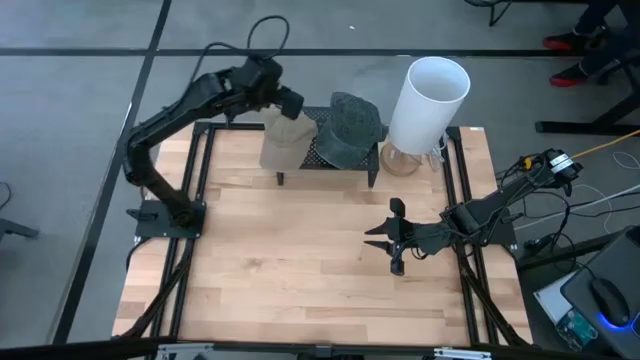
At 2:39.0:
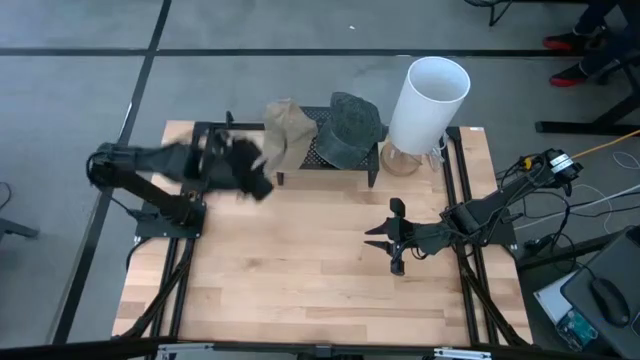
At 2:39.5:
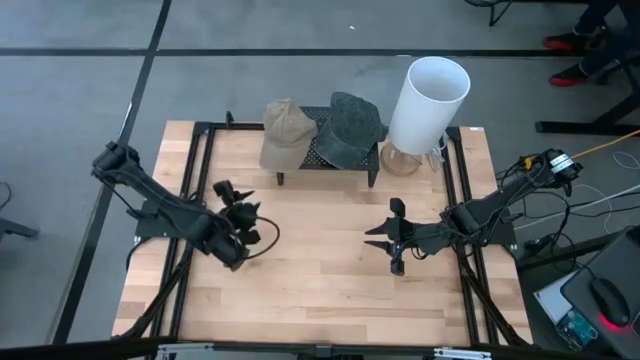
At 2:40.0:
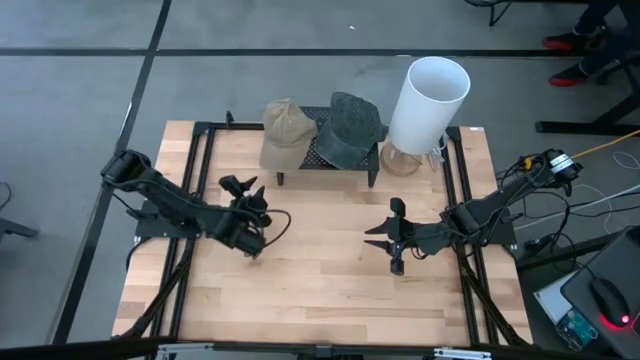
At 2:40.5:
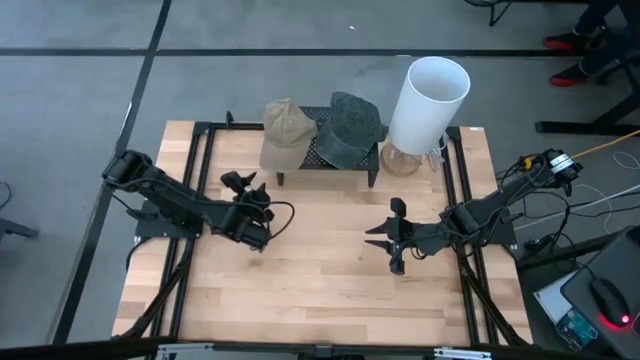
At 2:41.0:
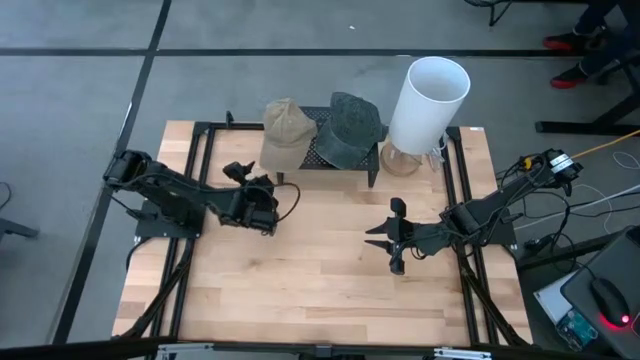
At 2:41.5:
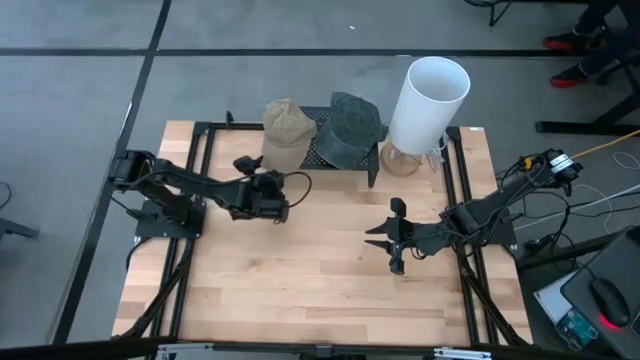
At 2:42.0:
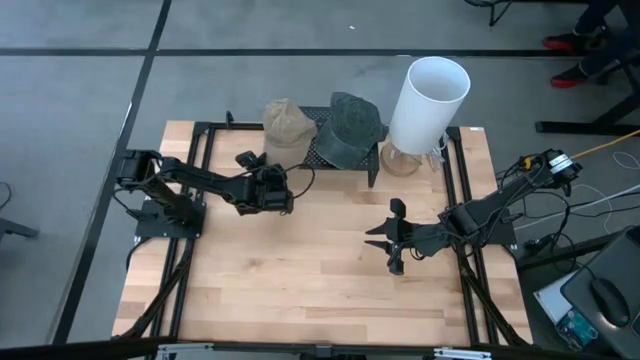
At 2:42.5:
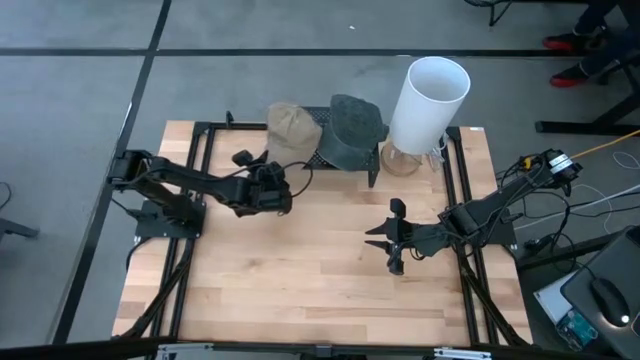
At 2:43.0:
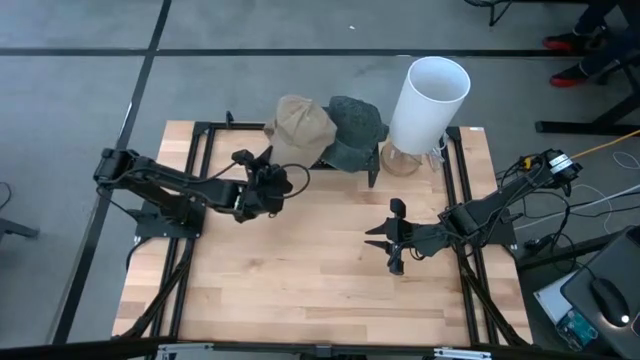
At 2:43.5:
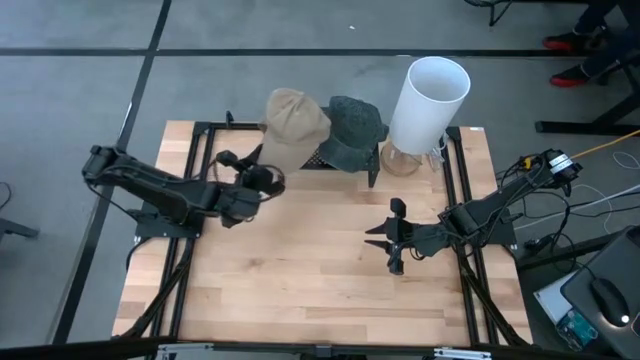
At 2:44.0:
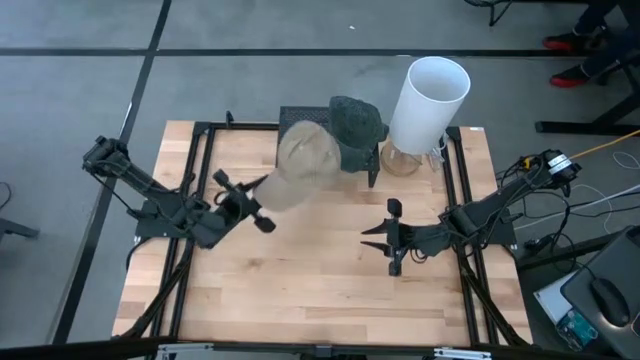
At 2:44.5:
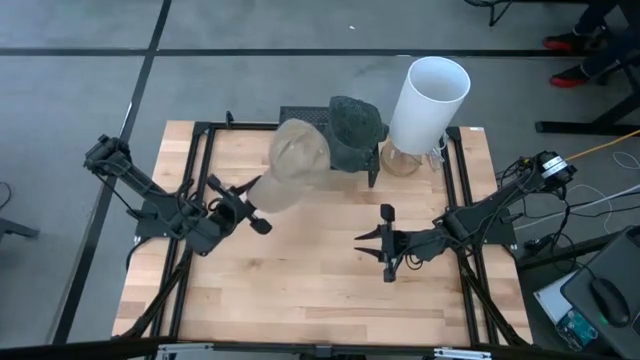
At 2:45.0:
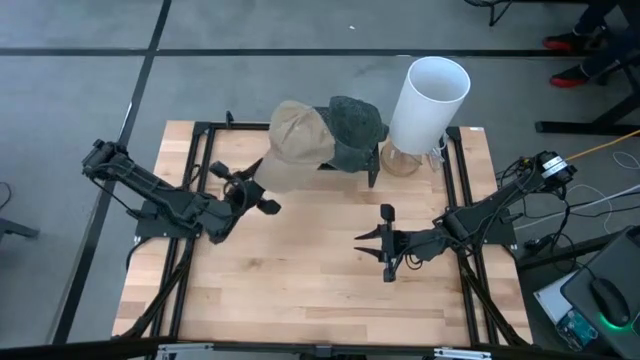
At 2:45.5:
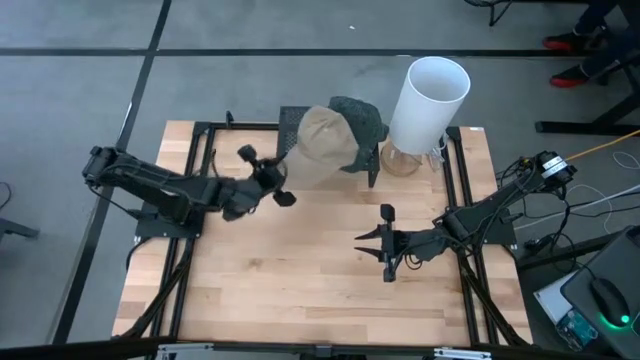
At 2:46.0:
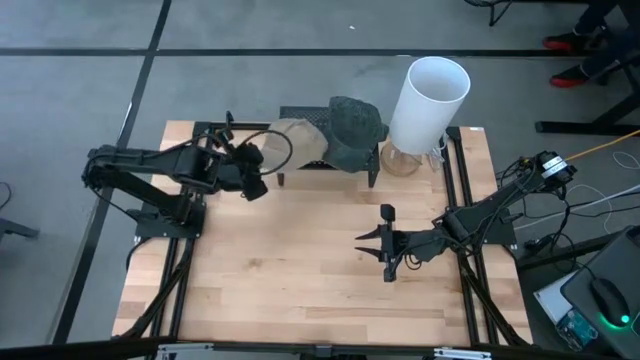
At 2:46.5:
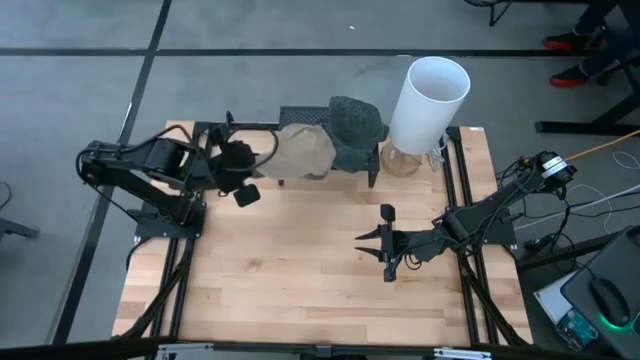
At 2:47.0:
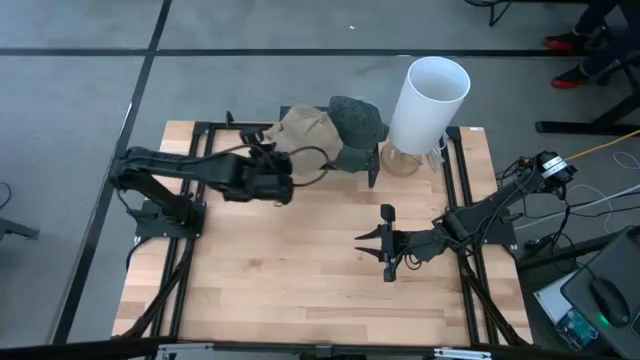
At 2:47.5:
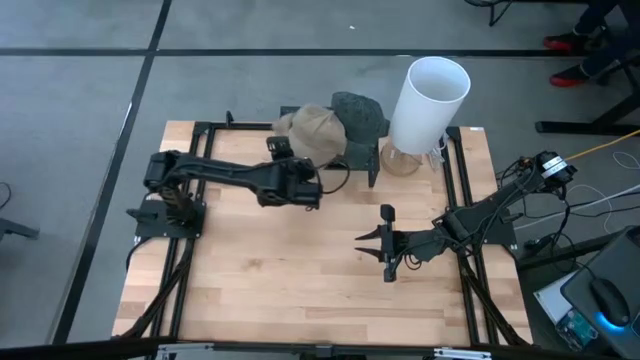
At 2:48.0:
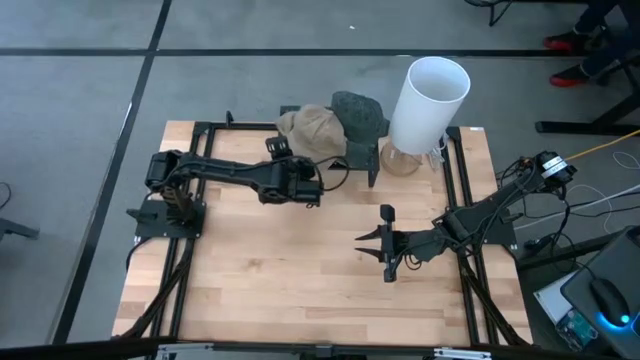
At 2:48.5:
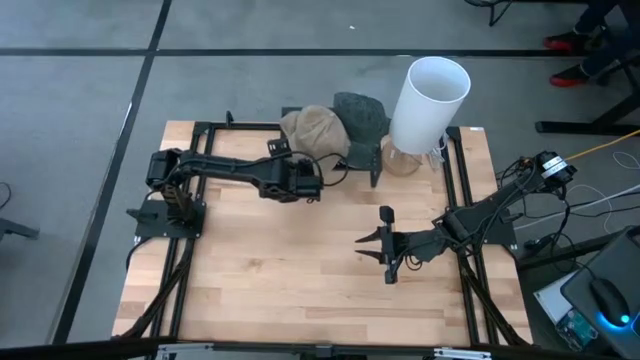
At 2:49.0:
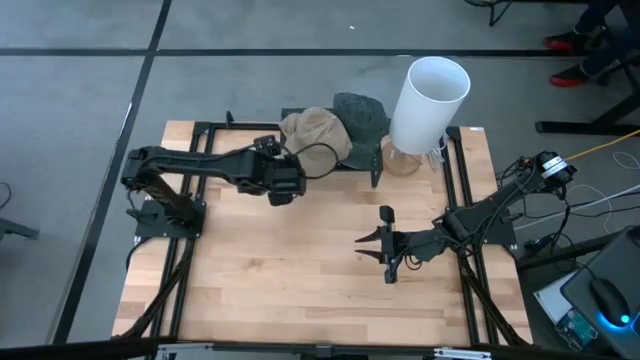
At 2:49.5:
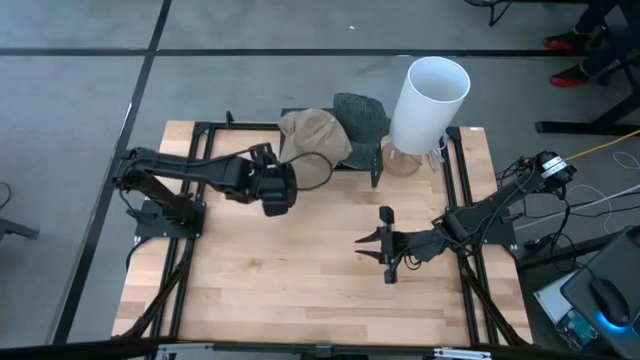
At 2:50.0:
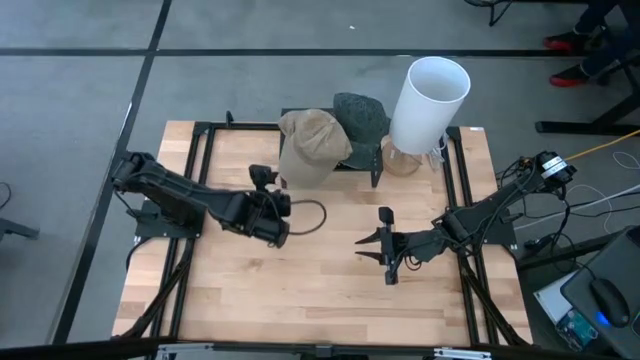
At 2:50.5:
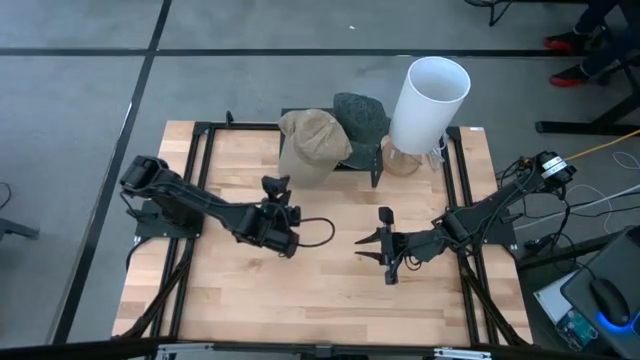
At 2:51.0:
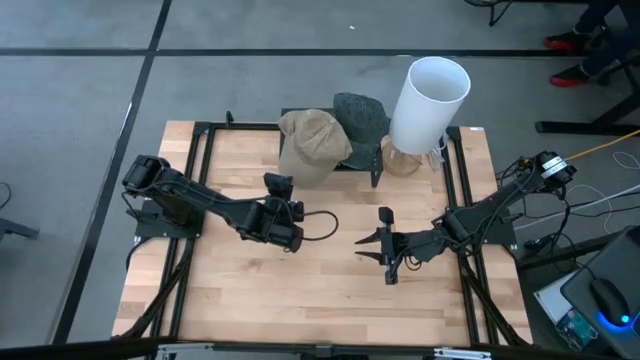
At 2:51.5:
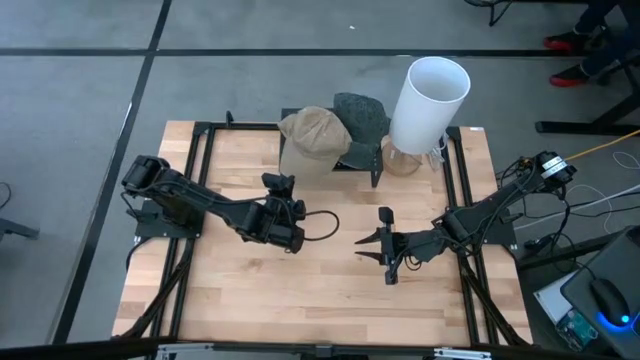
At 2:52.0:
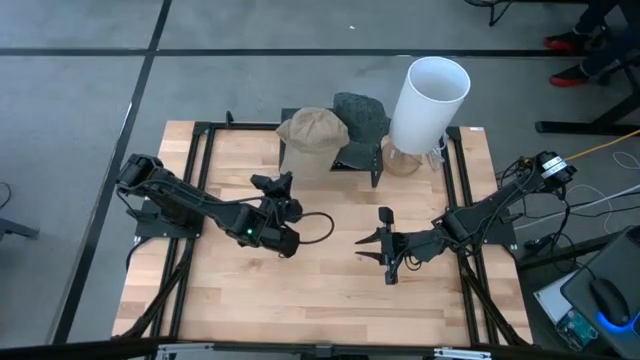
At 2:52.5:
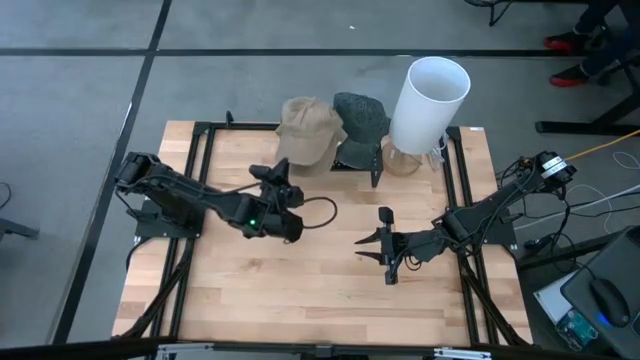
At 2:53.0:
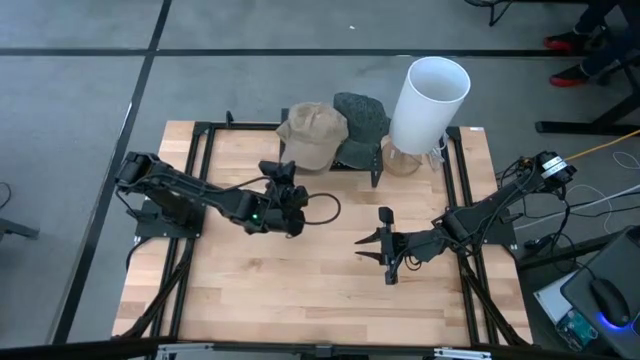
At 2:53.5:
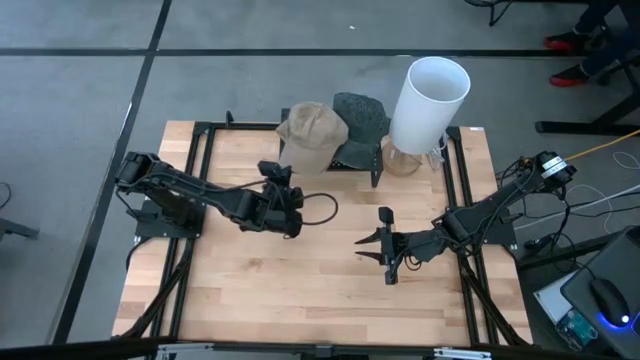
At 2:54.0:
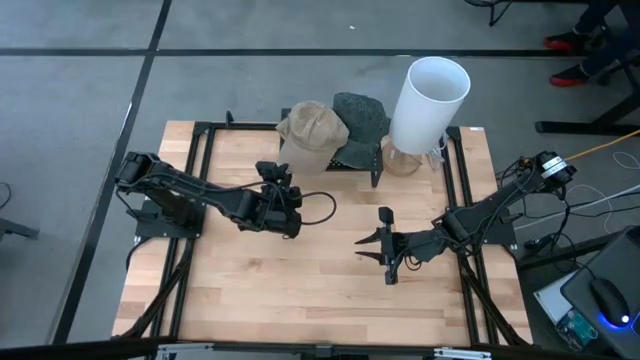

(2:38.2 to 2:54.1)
Task: Pick & Place hat
Adjust the brown caps on the shelf

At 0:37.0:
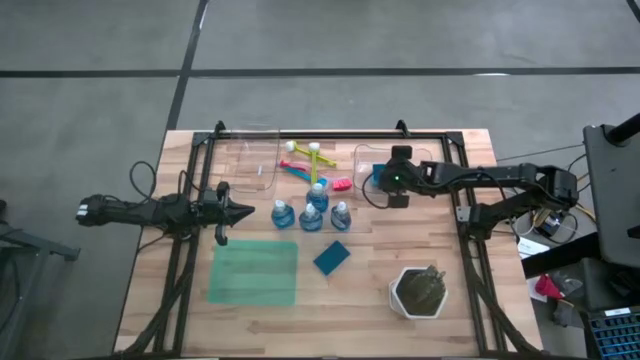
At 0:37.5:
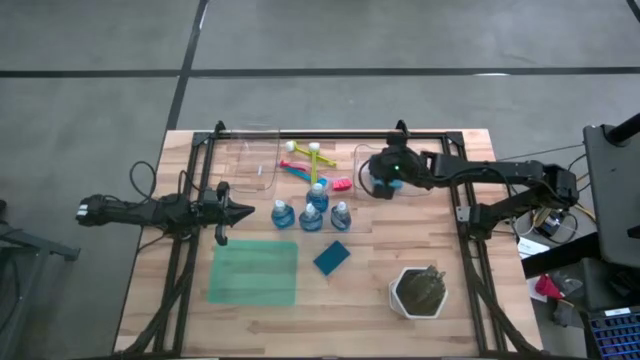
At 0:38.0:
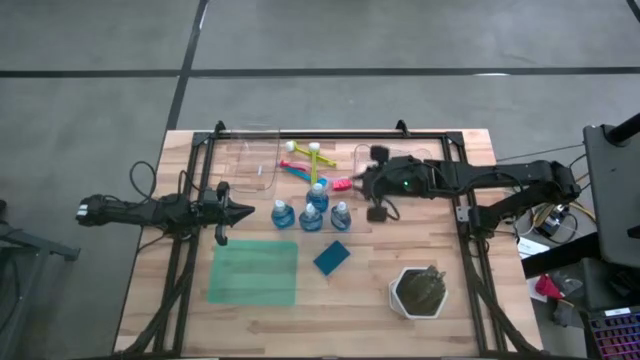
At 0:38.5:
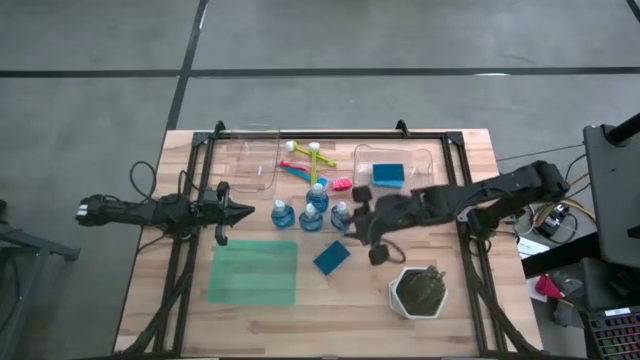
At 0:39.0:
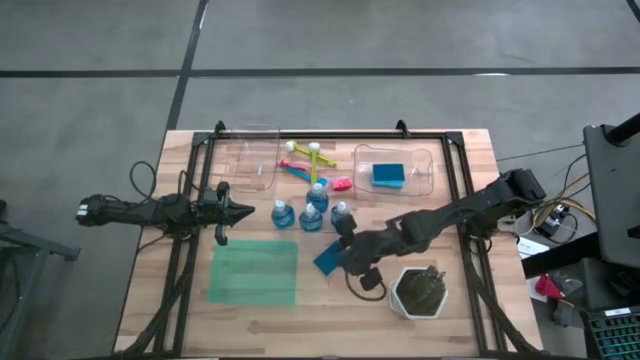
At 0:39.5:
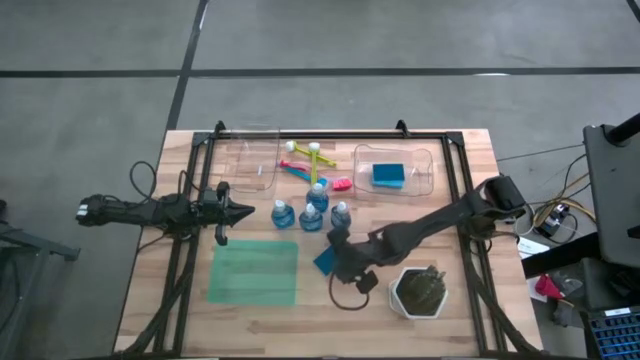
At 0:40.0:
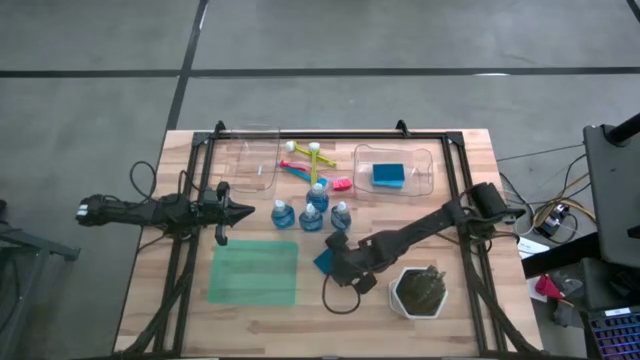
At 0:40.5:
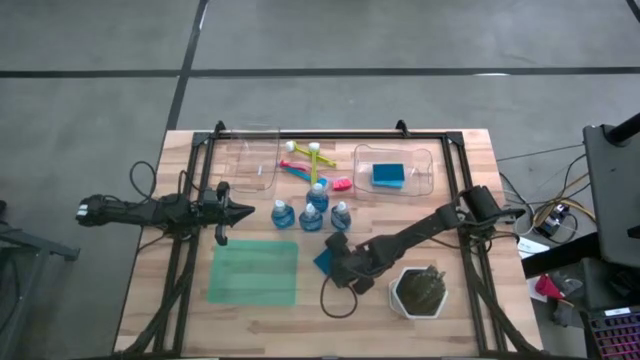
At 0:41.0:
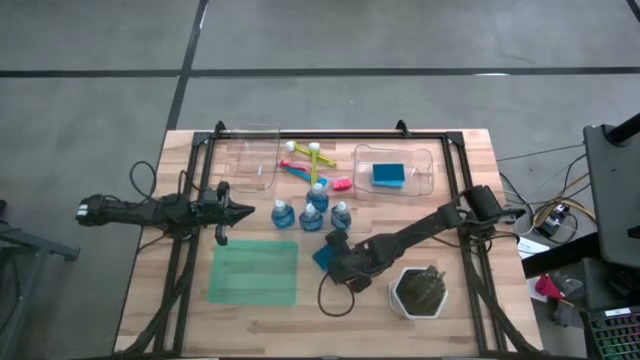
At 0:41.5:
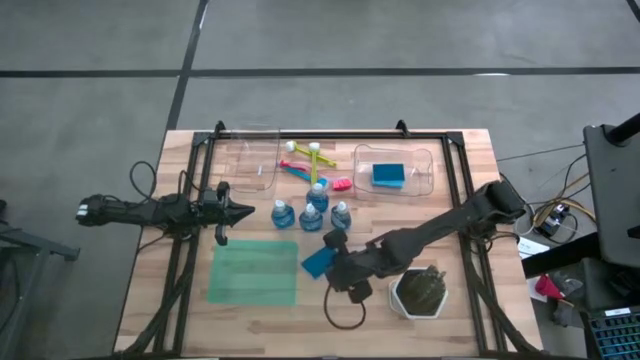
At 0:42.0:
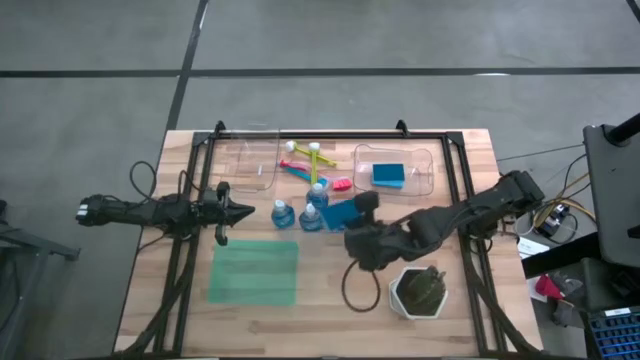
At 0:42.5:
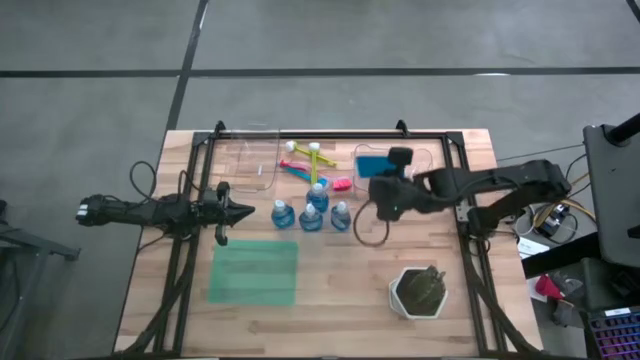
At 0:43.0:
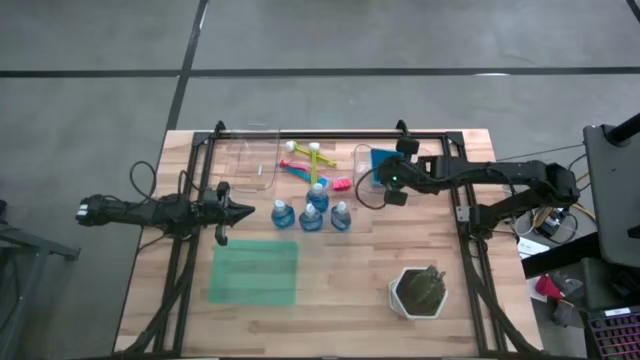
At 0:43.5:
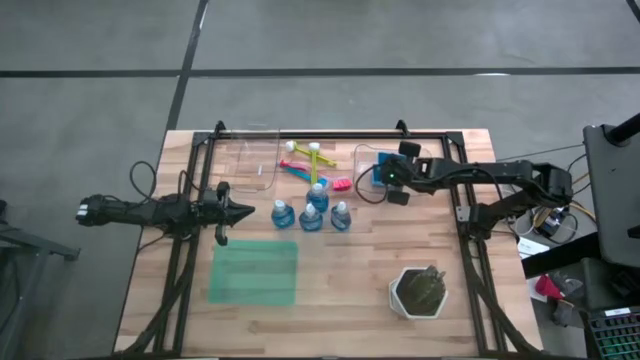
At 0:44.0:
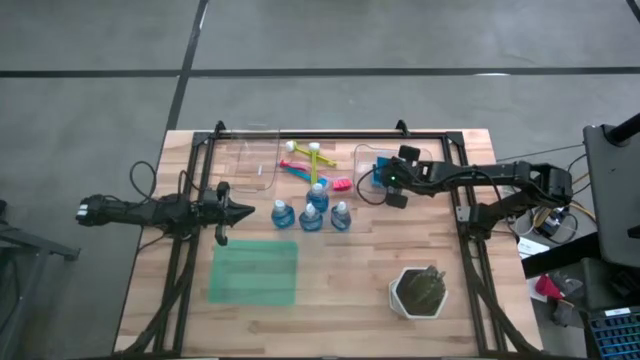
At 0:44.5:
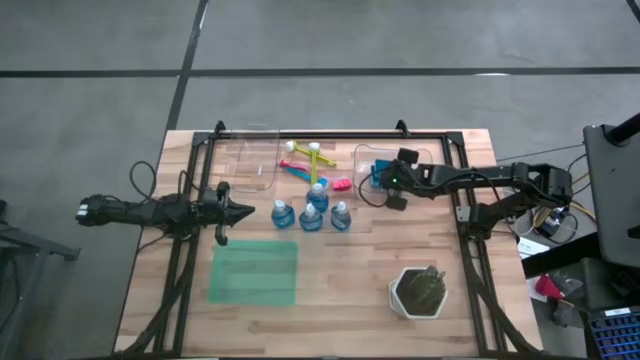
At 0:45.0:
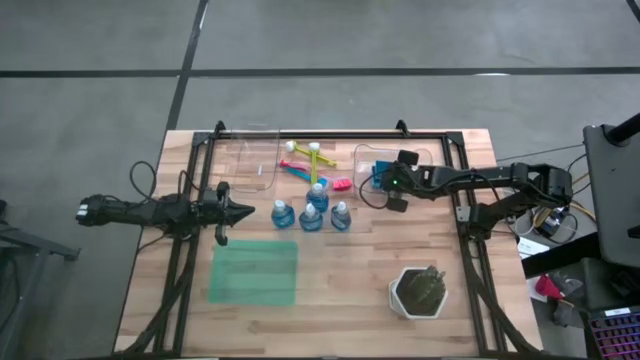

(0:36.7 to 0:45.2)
Task: Pick & Place Kitchen Sink Supplies
Put the blue sponge into the right transparent bin
